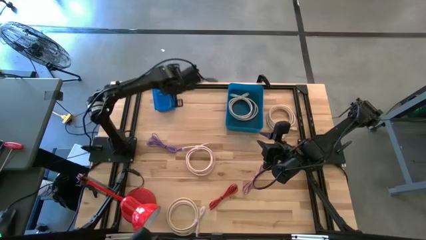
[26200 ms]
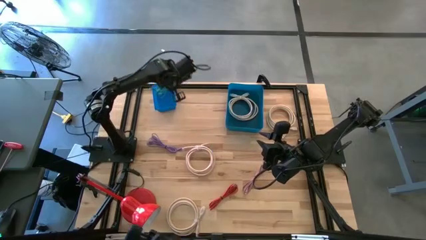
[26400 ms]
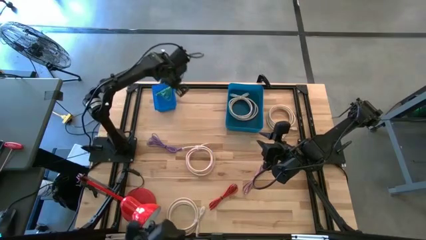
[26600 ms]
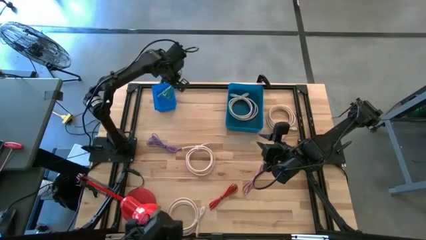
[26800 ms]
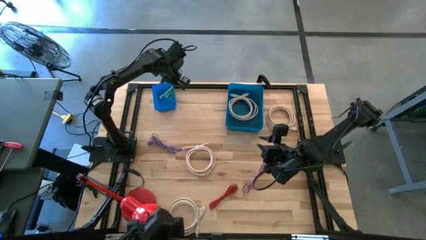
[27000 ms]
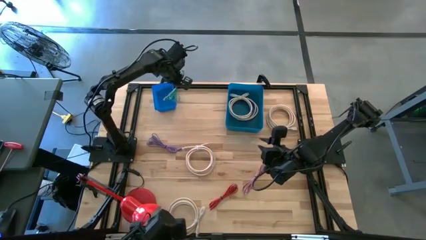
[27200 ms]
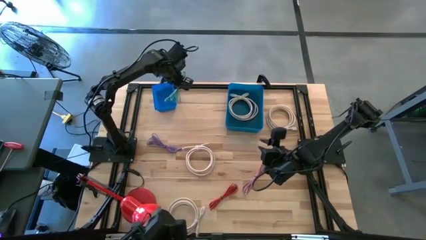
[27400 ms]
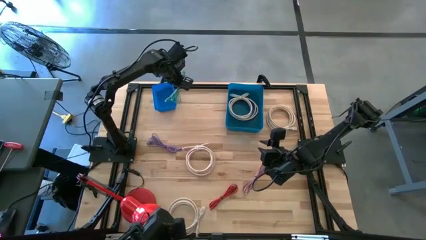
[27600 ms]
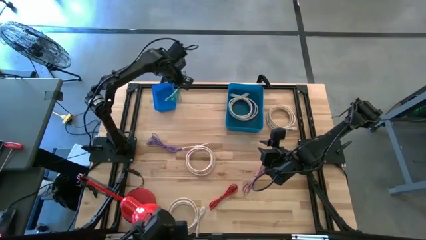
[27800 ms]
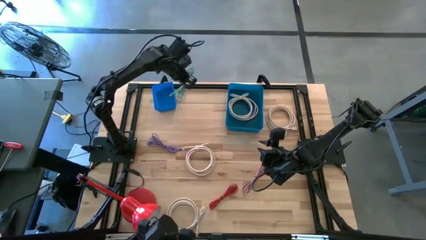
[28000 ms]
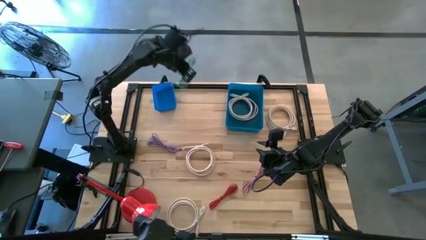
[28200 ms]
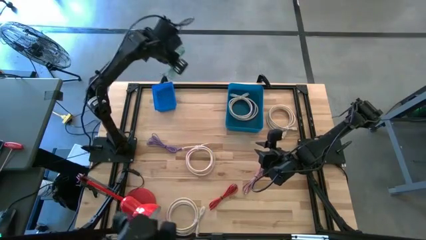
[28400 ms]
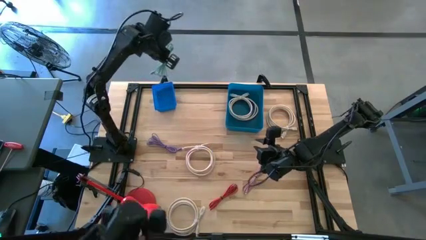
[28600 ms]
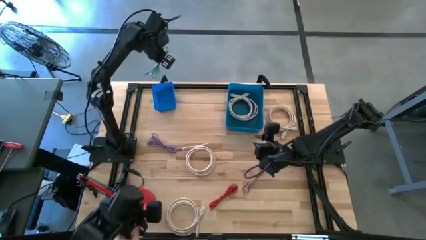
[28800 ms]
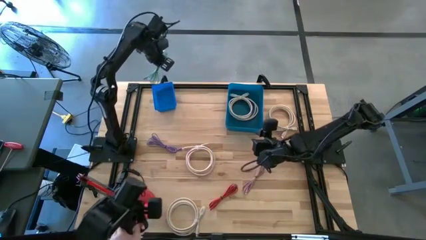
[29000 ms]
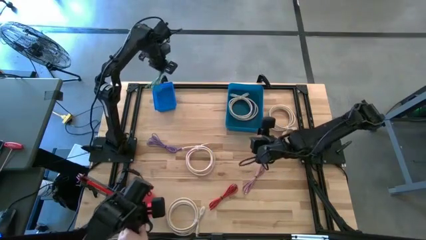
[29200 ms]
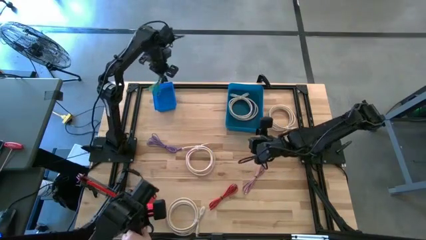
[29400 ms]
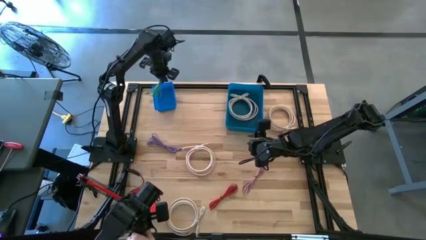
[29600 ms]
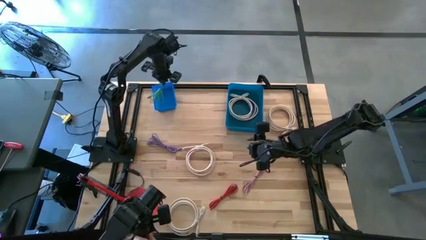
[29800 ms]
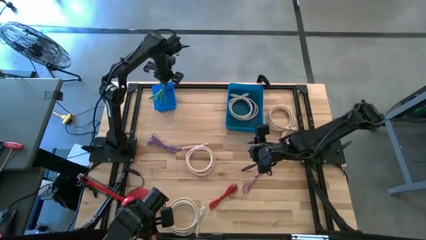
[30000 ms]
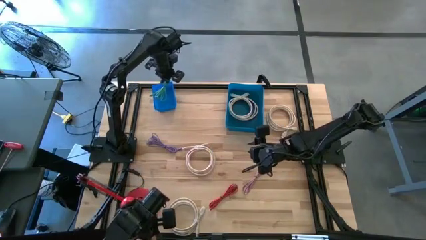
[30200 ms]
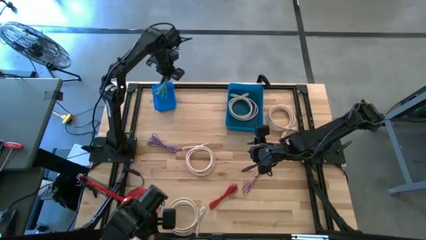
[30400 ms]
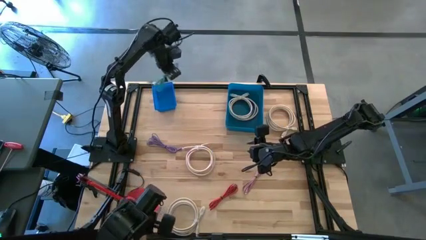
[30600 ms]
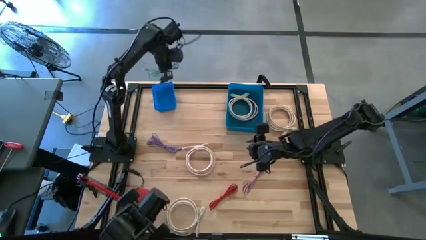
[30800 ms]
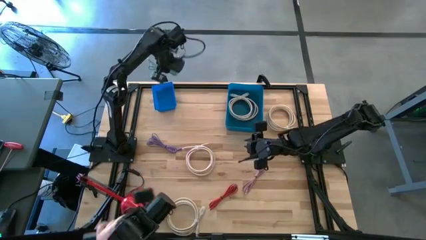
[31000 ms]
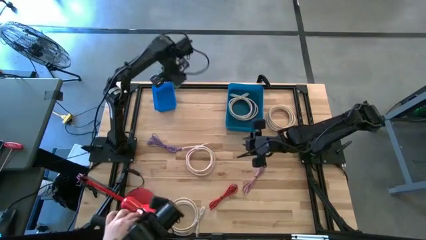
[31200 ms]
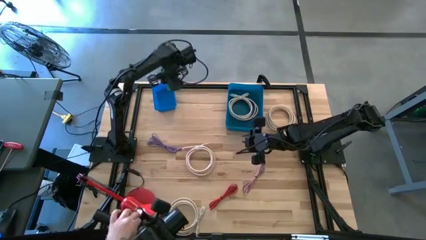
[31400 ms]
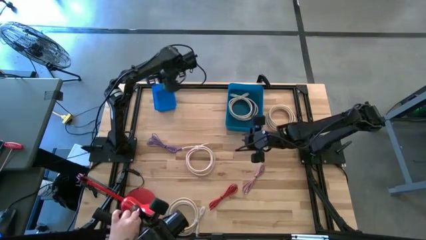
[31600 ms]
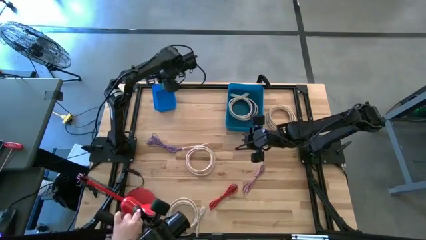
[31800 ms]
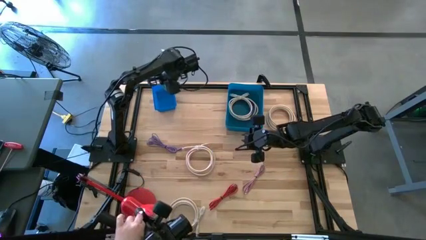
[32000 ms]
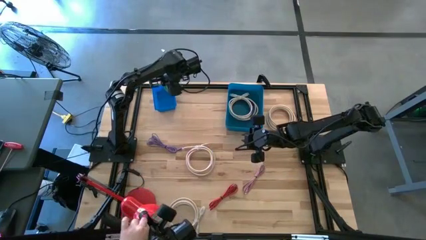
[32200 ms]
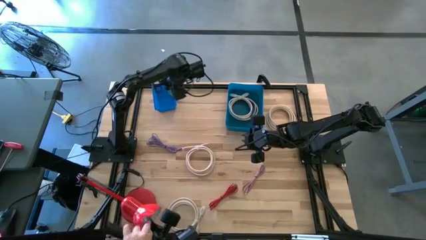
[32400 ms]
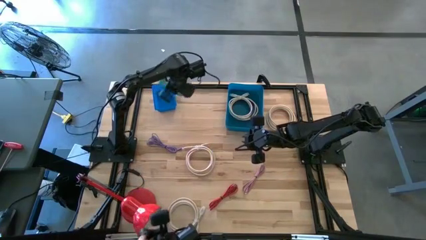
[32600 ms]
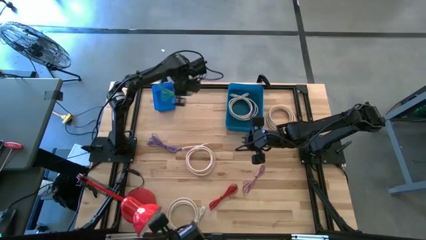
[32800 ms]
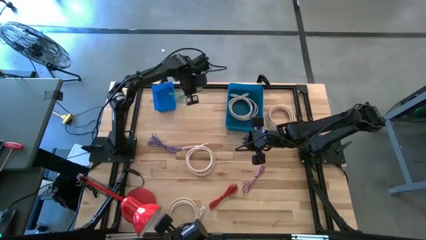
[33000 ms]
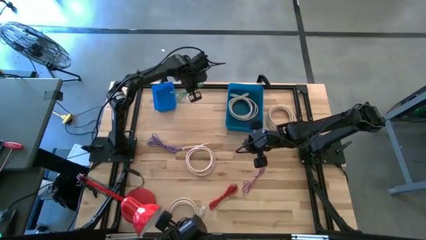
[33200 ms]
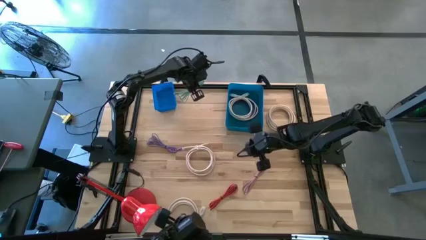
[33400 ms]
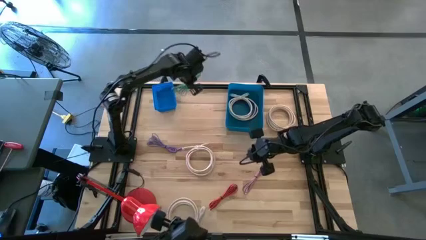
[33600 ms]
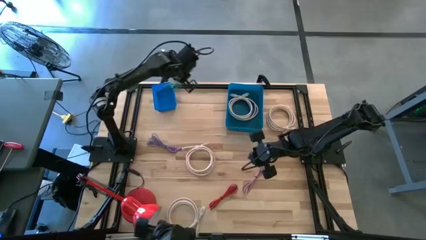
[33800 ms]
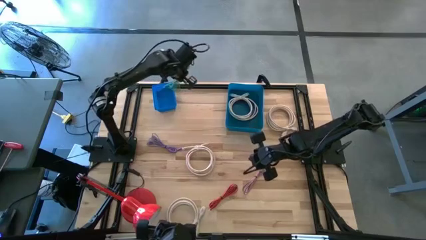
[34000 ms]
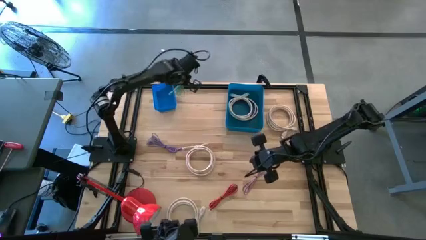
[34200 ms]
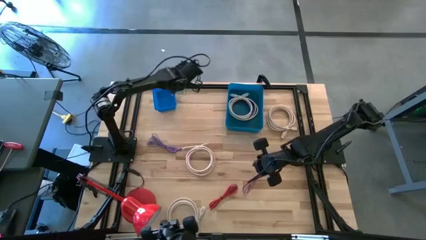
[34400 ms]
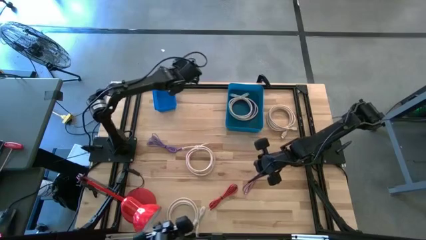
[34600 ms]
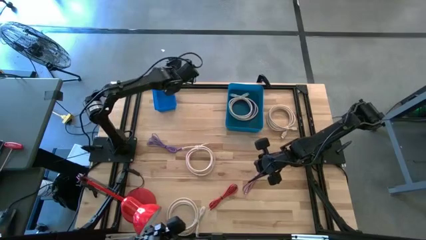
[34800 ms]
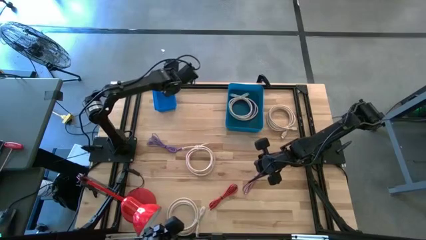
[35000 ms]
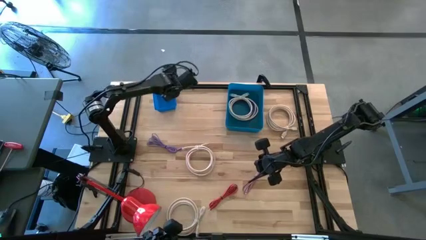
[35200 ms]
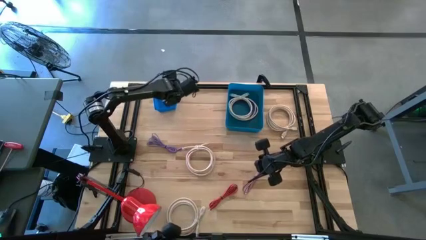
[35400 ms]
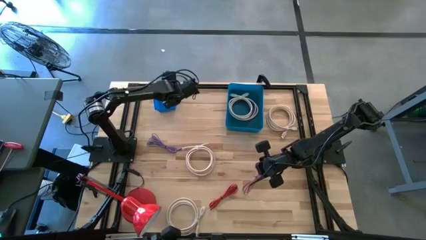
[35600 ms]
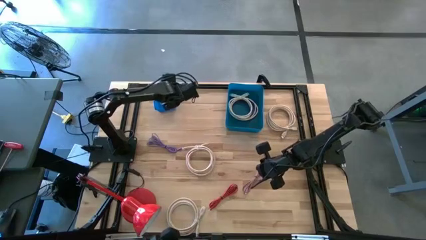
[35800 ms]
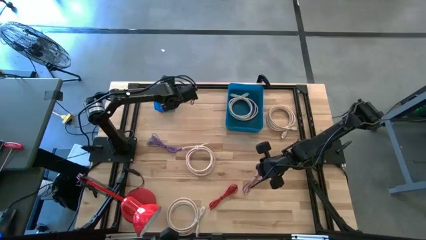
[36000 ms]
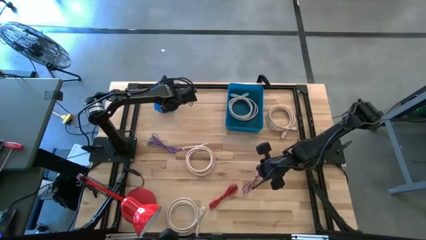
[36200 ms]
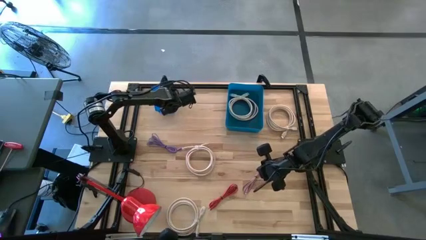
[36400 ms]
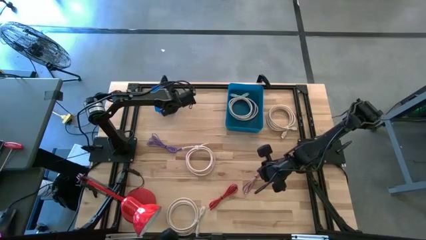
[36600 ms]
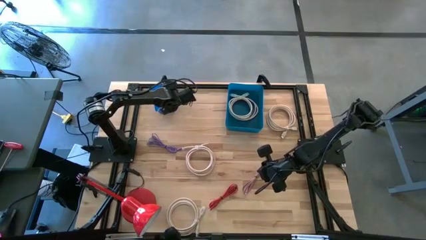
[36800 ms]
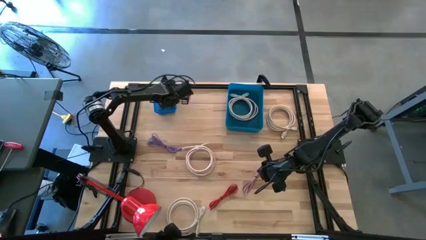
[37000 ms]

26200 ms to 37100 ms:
Task: Pick & Place USB Port
Put the green charger cable into the blue bin

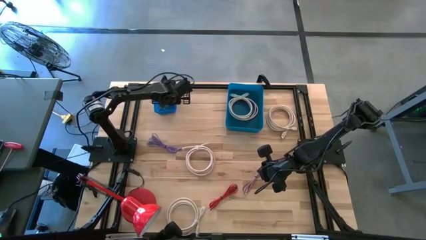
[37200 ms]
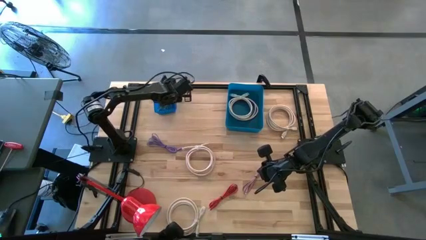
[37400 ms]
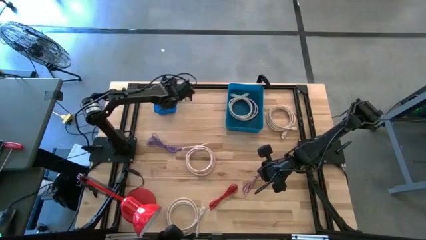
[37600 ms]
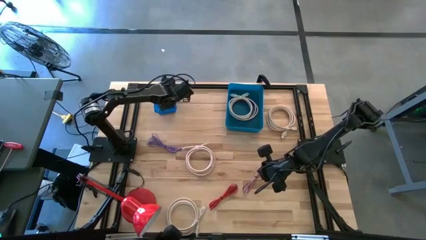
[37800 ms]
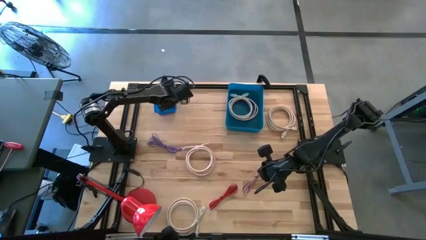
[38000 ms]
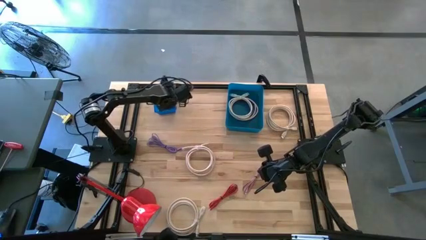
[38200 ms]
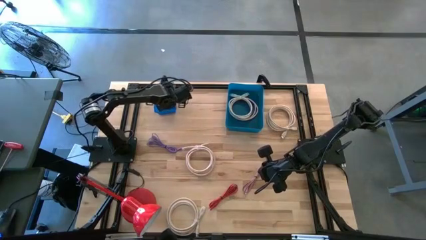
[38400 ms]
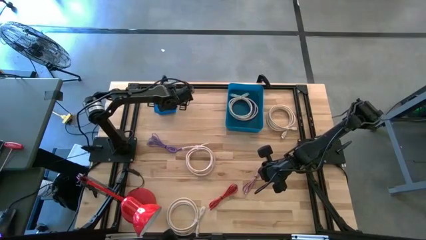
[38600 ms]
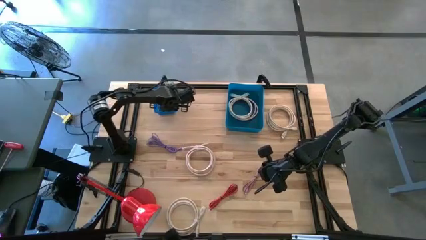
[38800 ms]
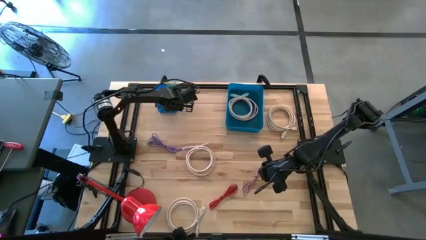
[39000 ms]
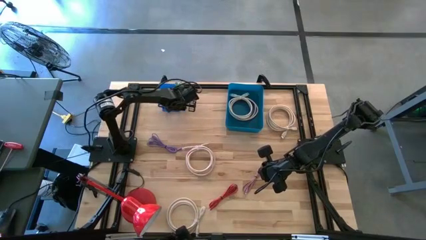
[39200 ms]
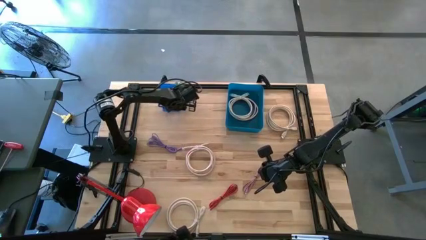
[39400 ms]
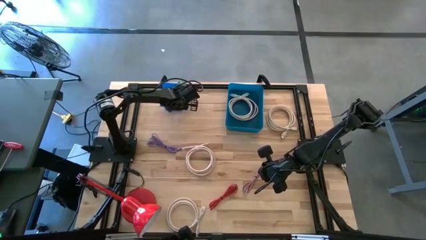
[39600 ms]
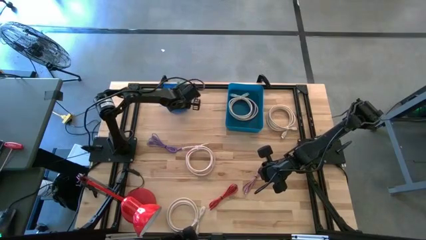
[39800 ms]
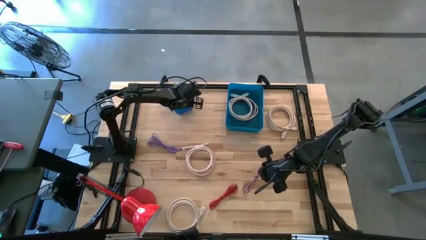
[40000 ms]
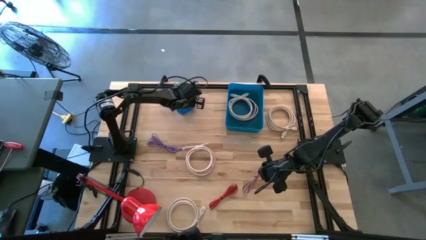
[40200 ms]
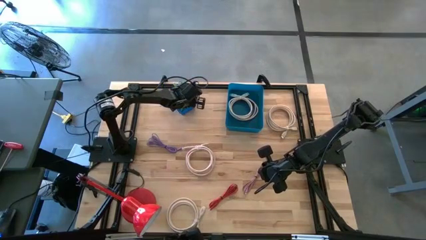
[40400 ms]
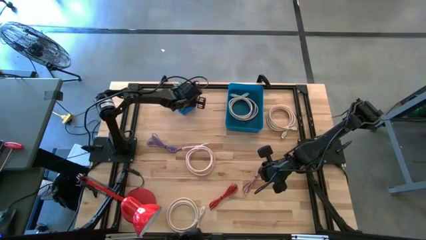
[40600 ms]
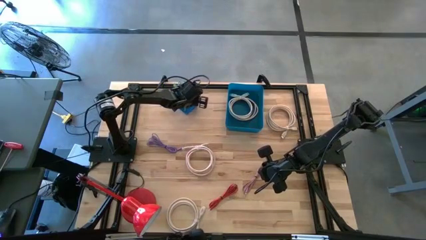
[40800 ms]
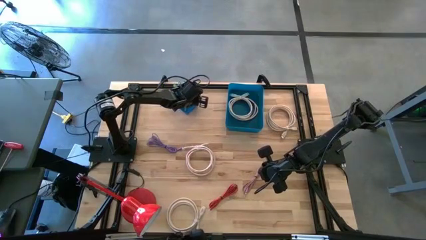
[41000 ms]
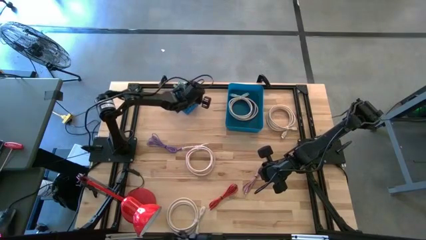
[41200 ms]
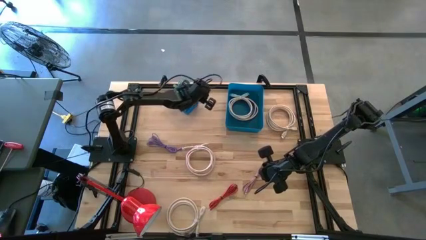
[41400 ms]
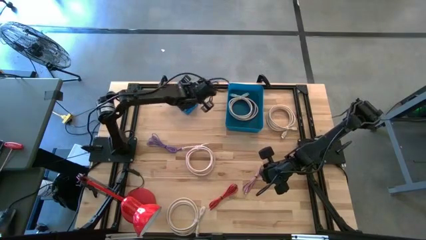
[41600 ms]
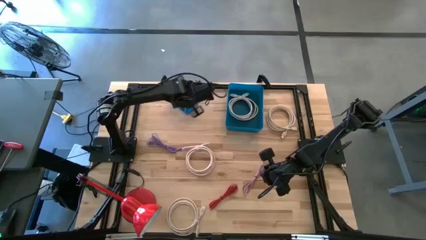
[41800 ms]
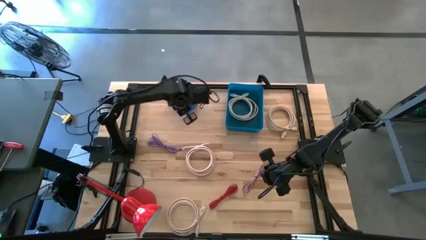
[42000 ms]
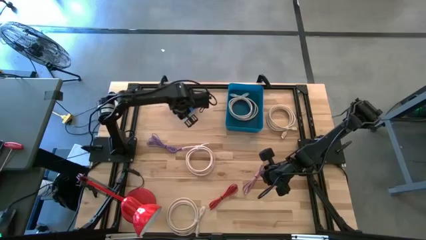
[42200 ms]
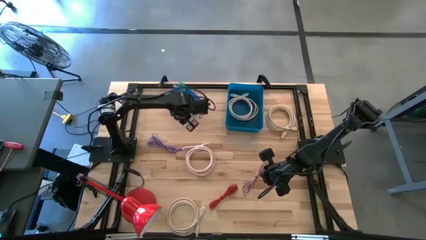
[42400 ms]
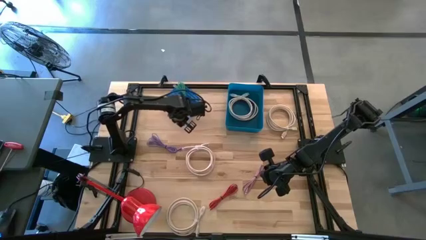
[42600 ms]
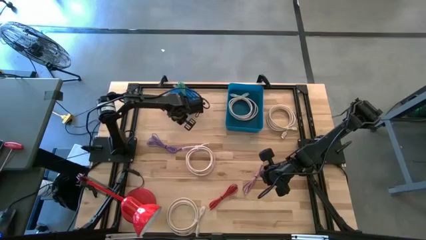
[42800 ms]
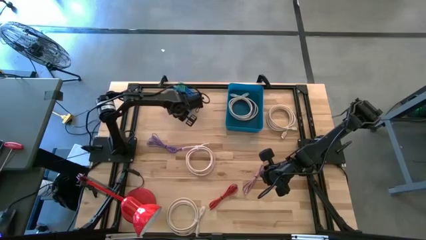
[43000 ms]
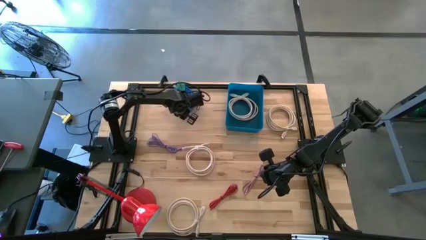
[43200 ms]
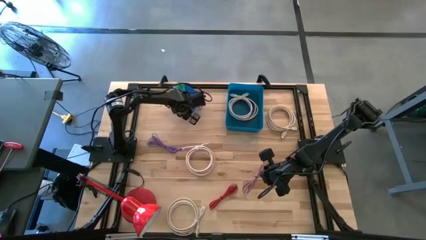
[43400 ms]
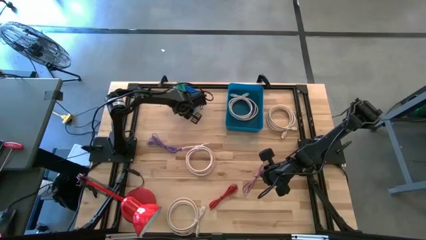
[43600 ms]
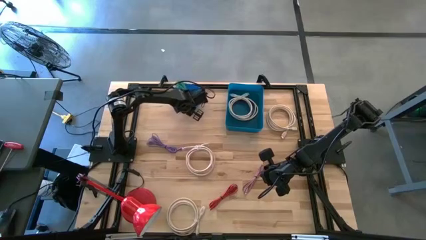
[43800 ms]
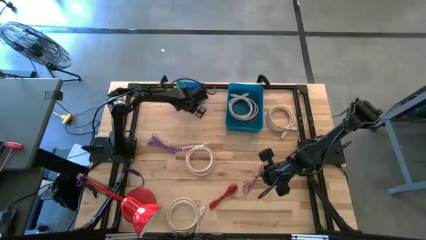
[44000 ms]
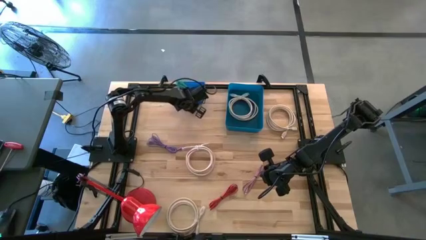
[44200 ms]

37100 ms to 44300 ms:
Adjust the blue bin
